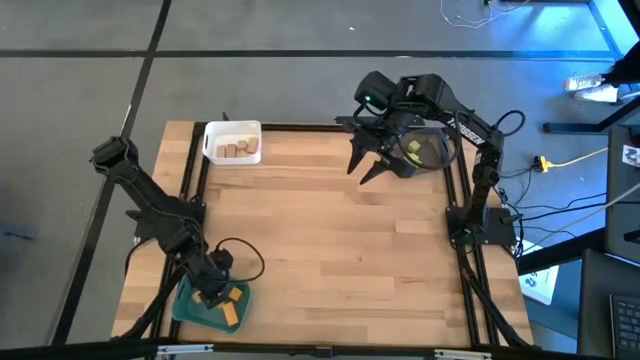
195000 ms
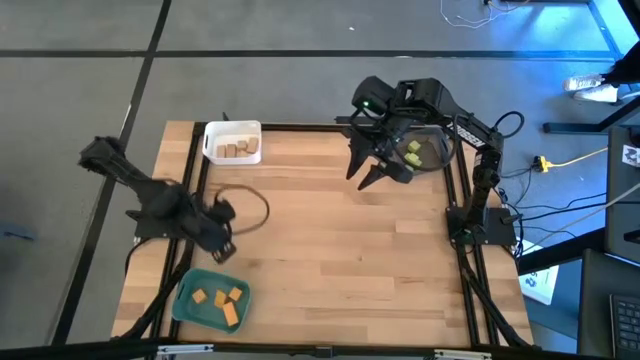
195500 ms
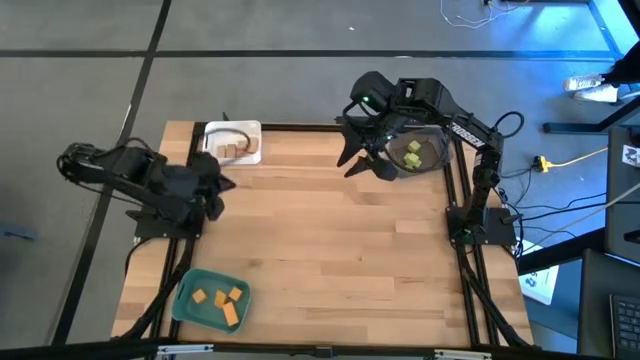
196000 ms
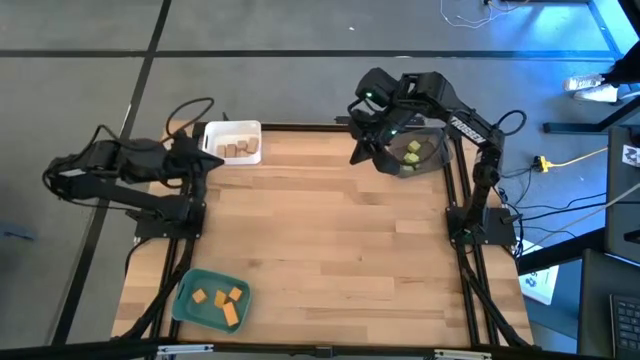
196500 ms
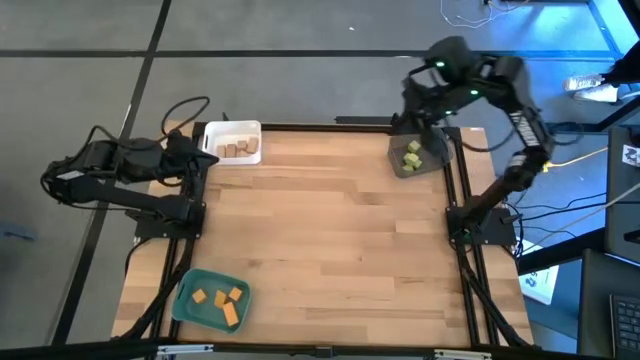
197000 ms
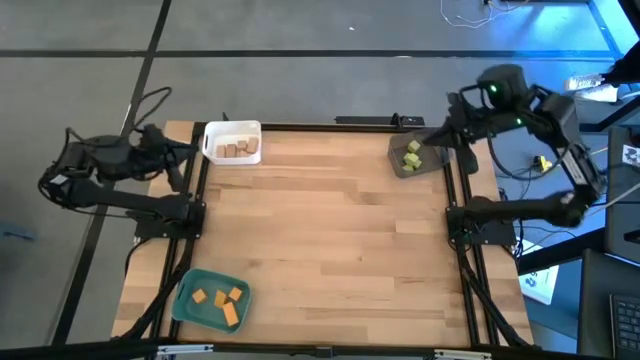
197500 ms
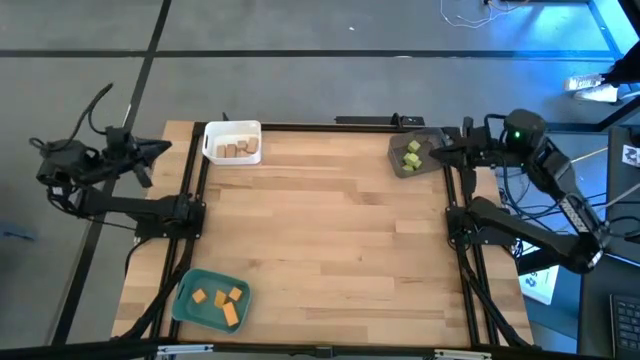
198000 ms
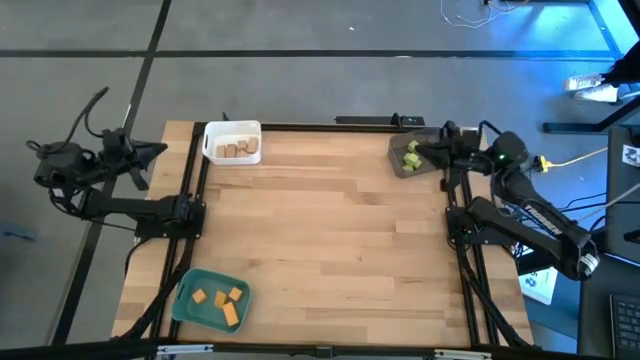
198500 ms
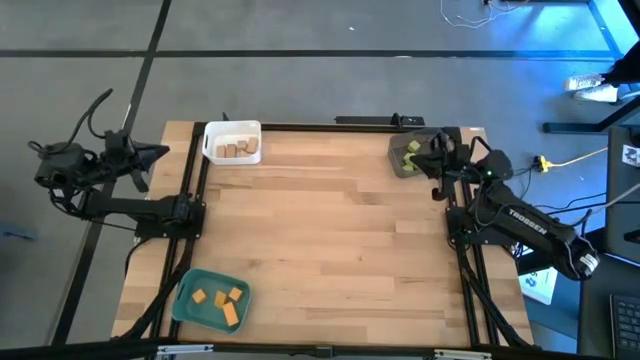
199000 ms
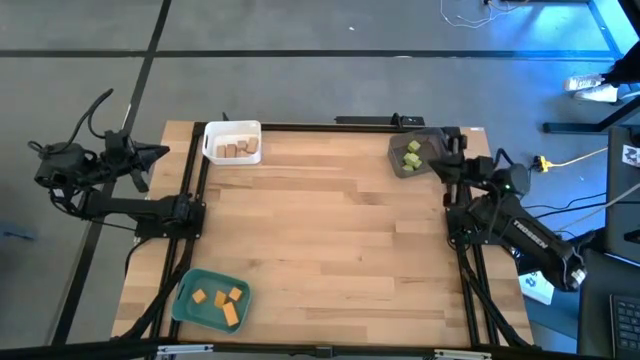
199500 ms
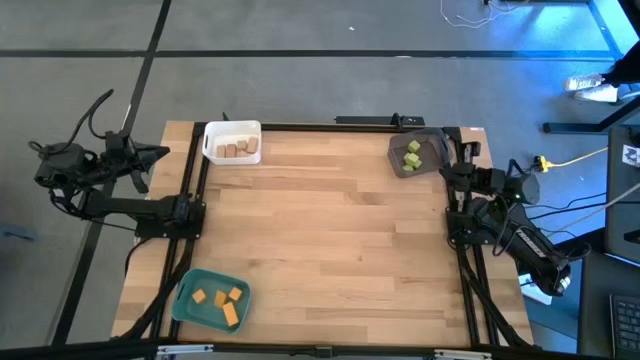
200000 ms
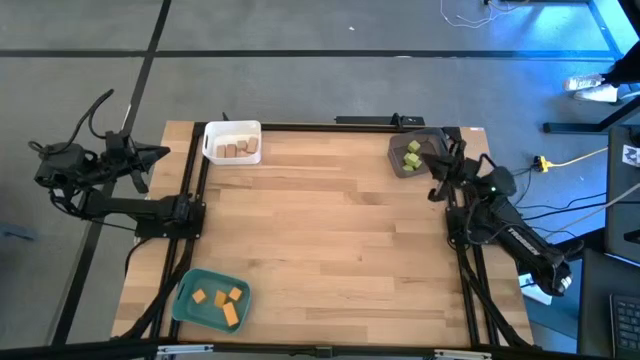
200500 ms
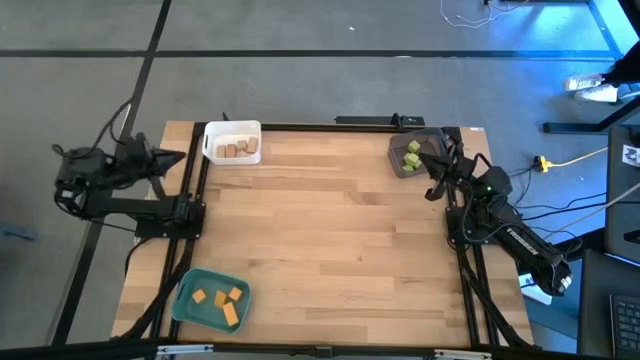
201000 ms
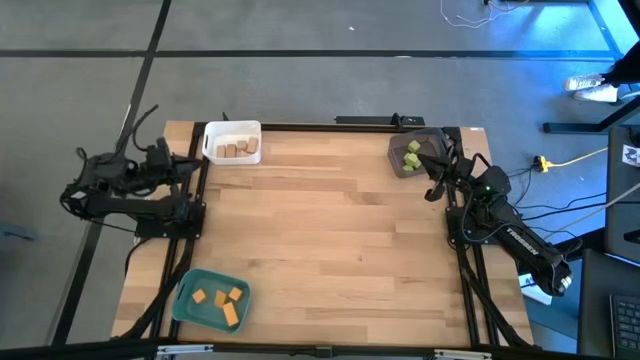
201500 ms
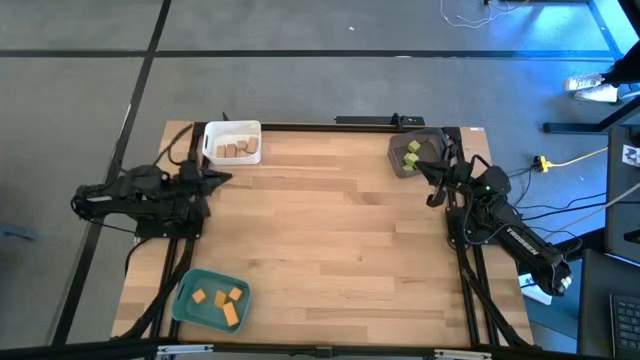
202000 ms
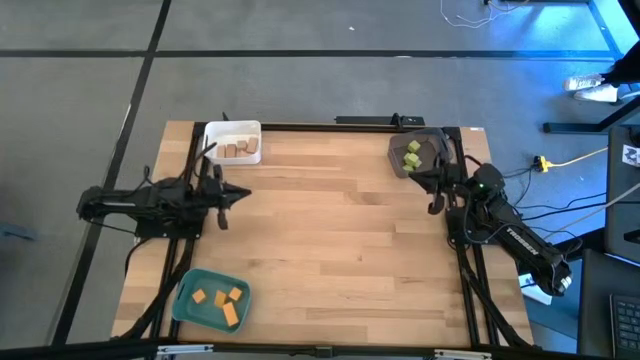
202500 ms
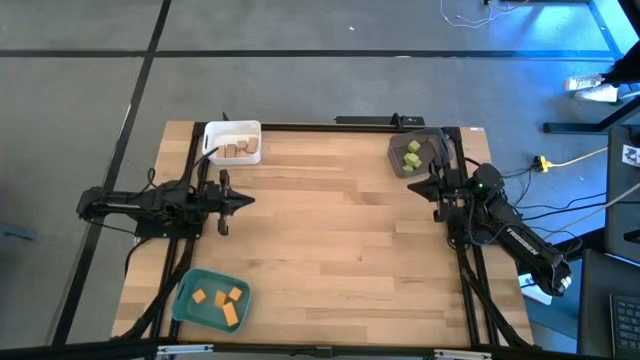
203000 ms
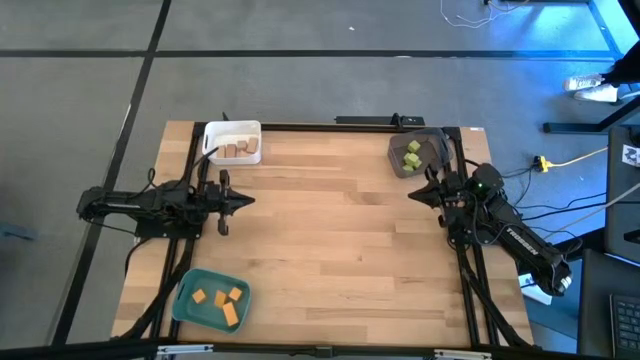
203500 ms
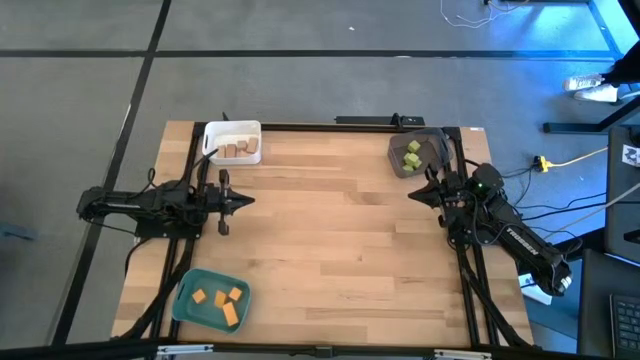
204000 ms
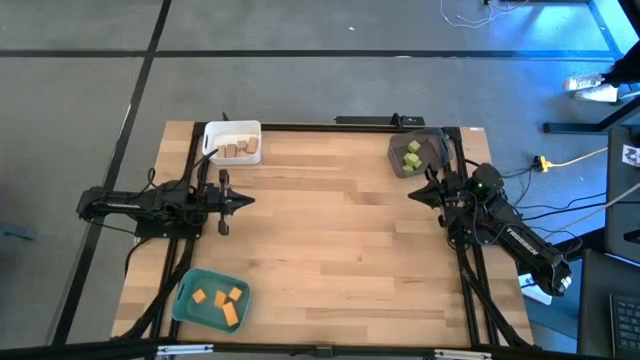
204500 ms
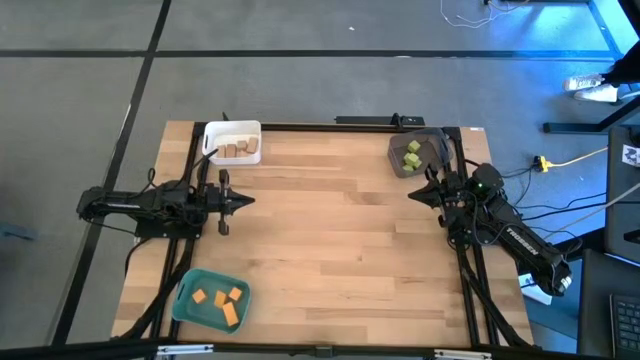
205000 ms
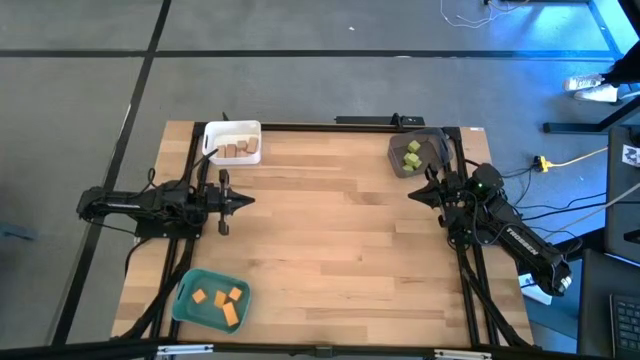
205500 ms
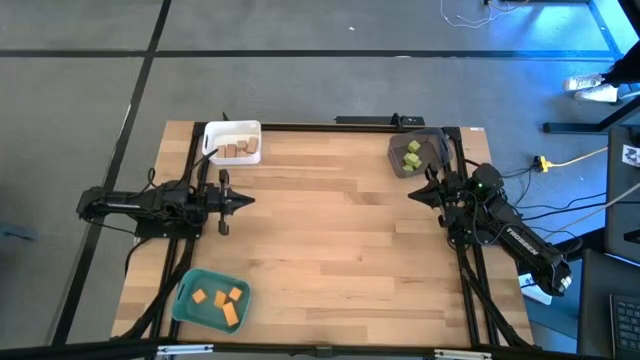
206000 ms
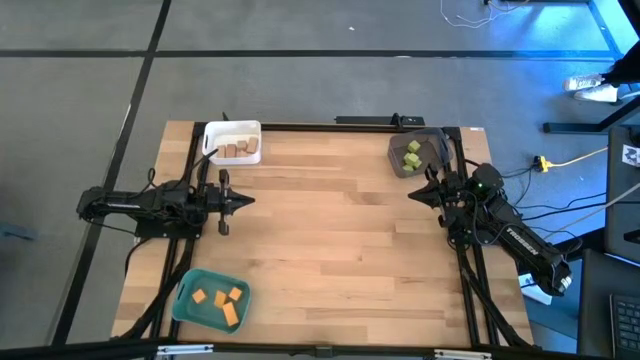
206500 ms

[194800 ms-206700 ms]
Task: Sort & place blocks by color
Return to Home Position

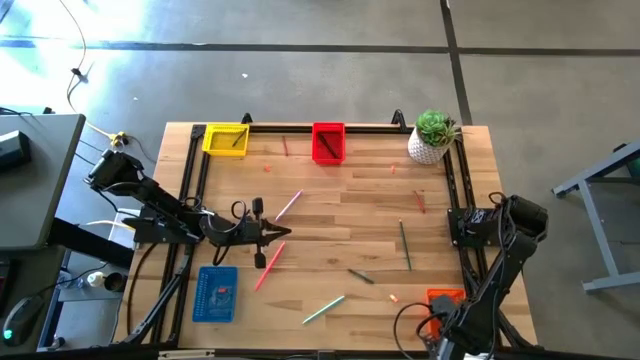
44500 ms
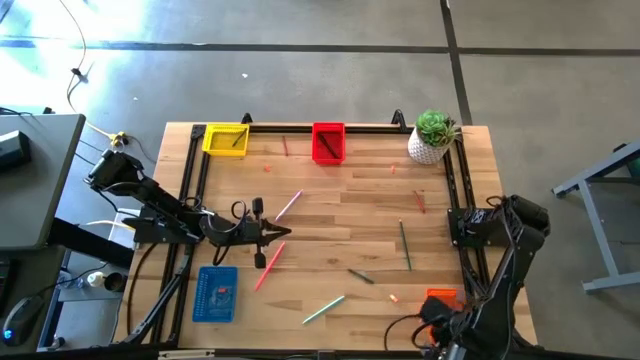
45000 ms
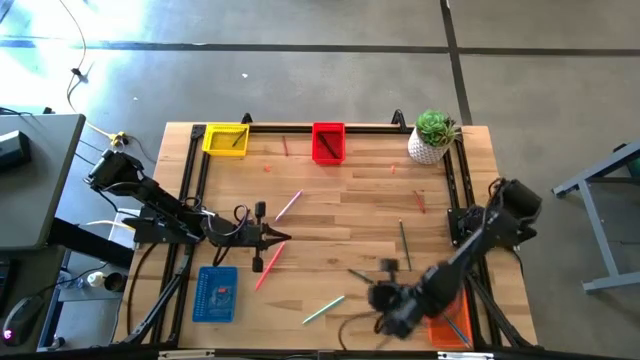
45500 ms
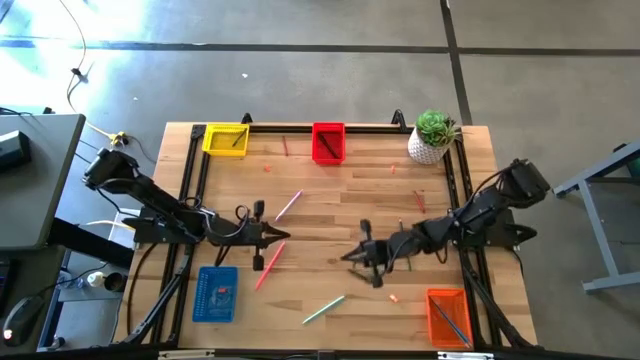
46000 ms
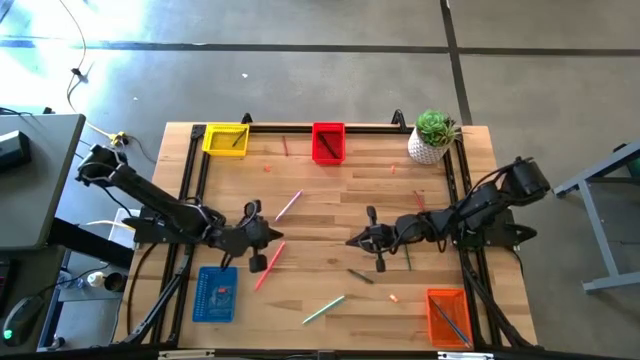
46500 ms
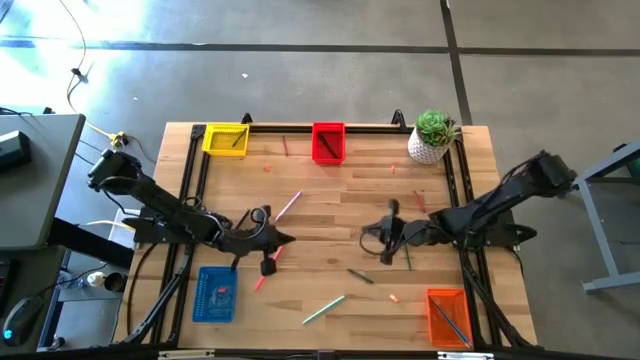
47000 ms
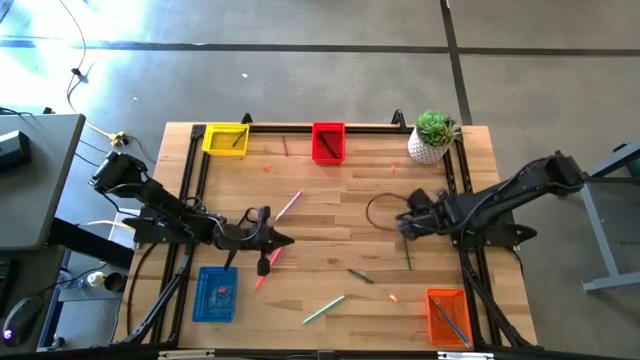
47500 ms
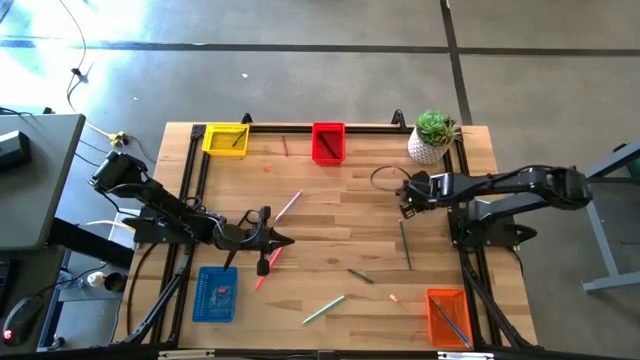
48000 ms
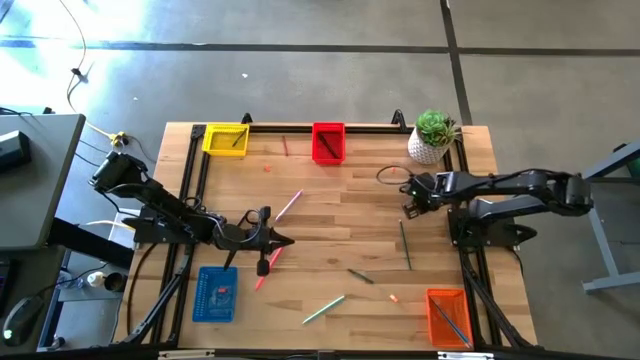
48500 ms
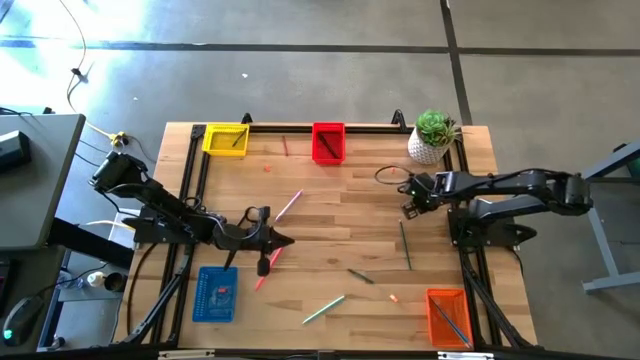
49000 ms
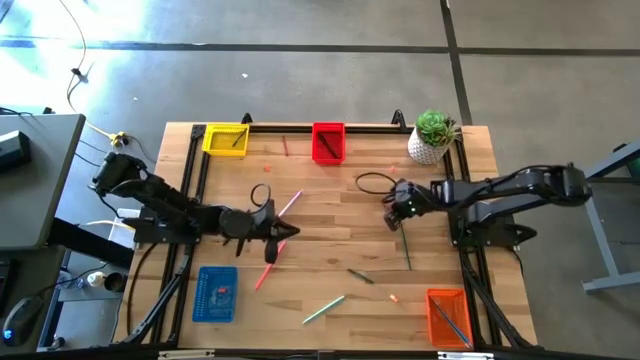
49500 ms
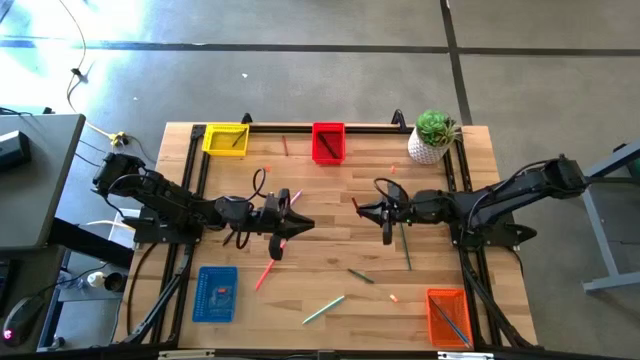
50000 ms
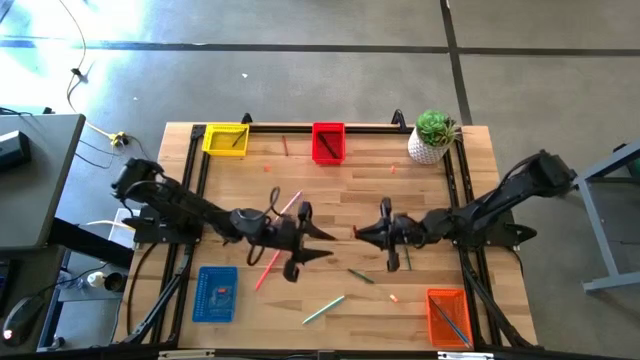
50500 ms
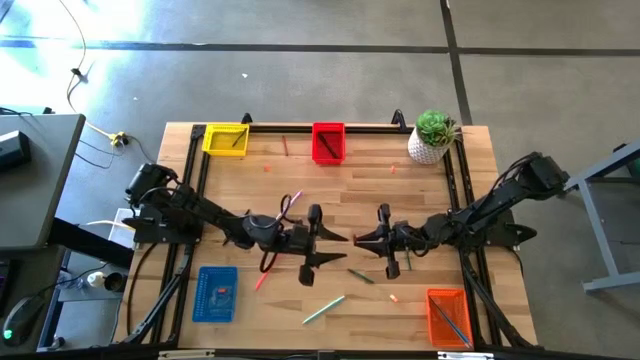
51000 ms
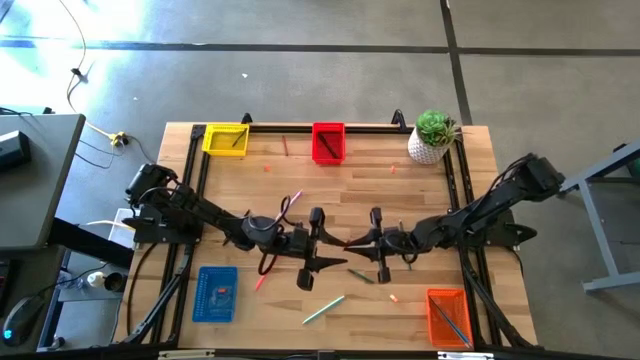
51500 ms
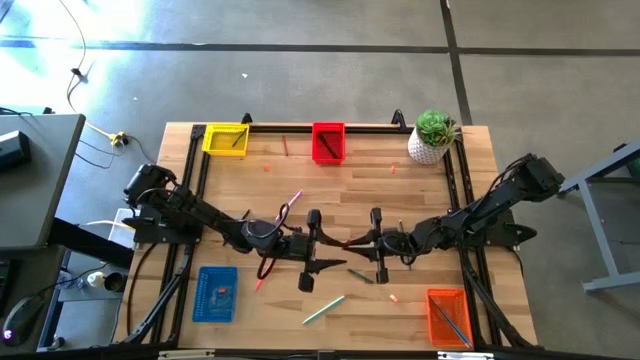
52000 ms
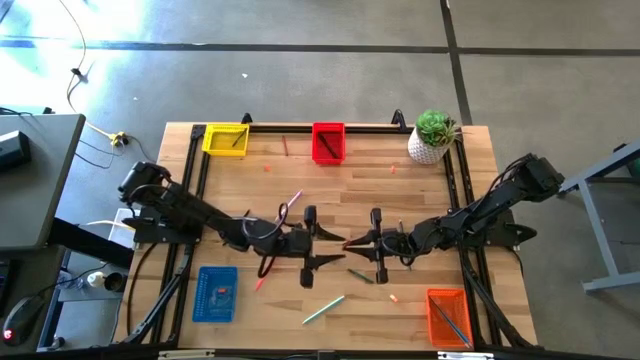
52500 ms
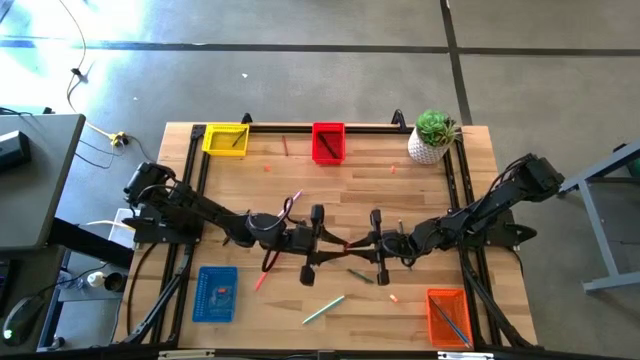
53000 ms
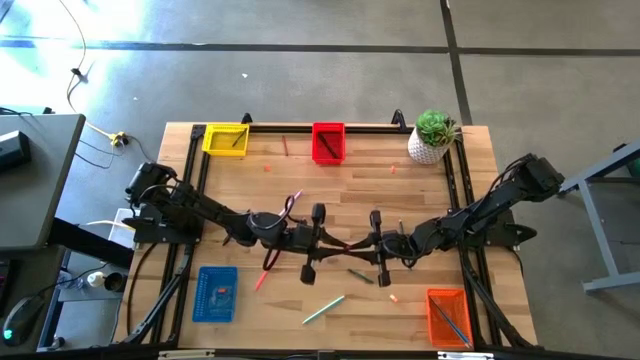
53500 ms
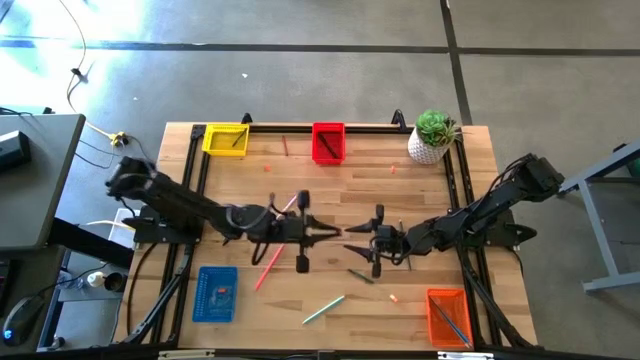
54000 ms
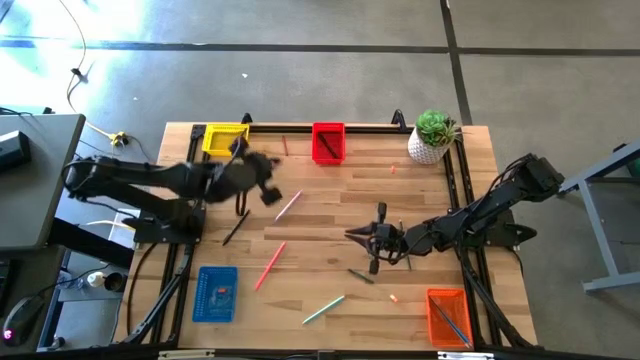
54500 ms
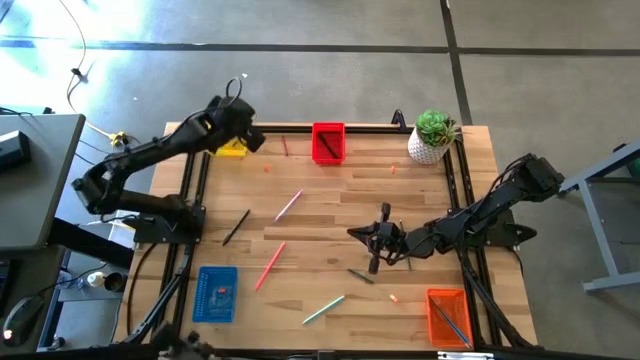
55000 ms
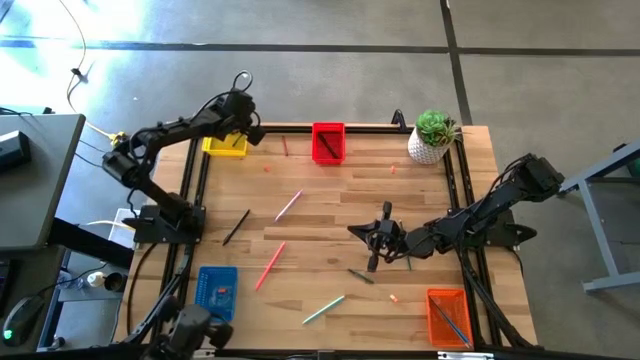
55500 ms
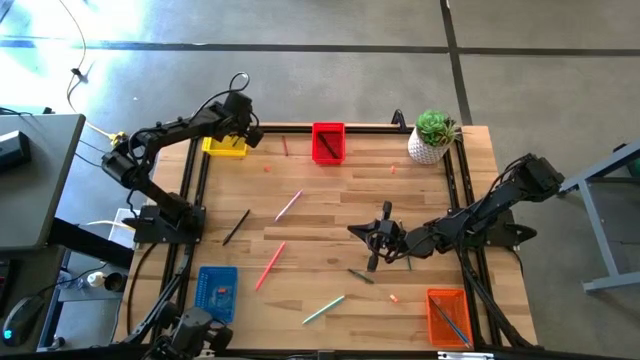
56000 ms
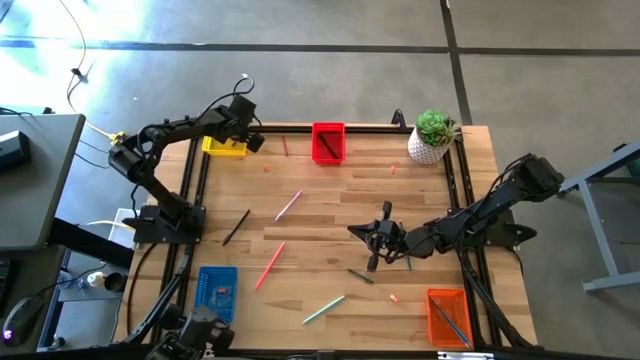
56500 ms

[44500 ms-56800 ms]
Task: Sort crayons/erasers/pens/pencils in bins
Put the bottom red crayon into the yellow bin
